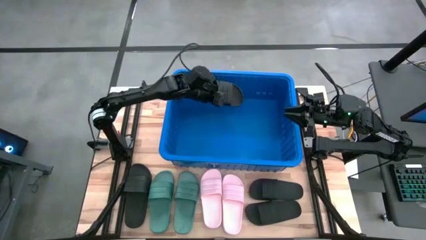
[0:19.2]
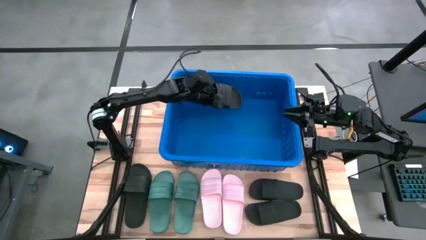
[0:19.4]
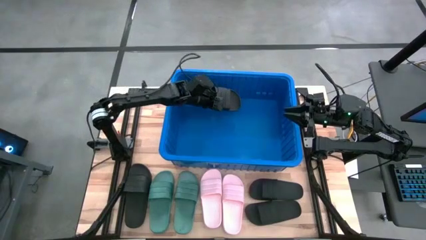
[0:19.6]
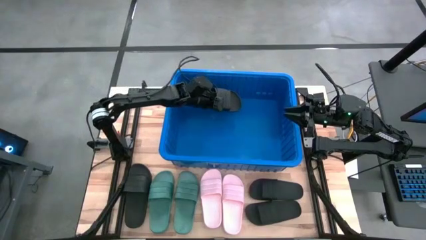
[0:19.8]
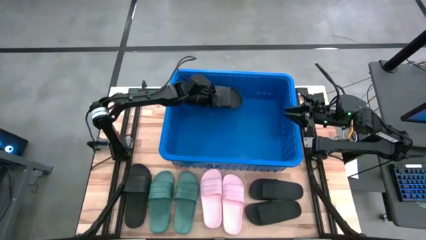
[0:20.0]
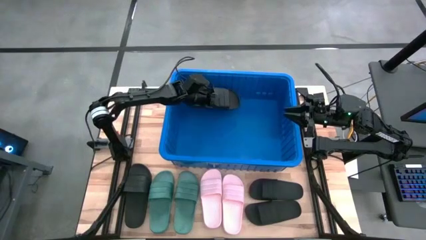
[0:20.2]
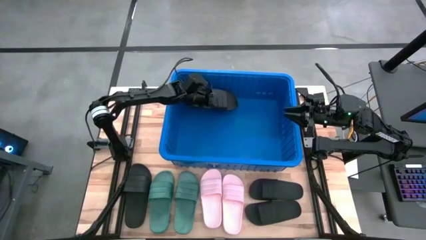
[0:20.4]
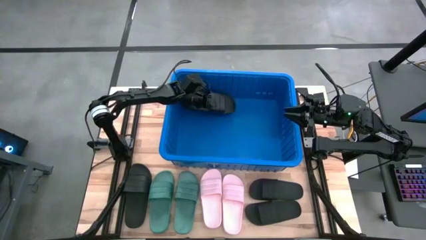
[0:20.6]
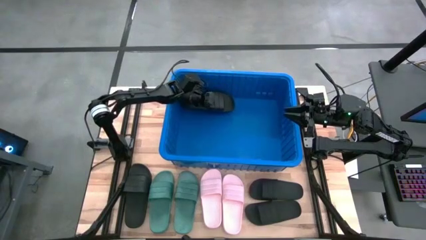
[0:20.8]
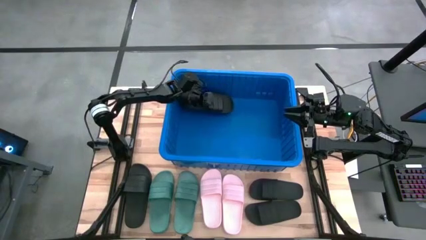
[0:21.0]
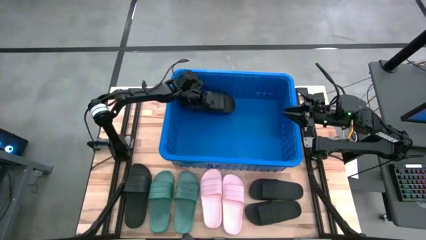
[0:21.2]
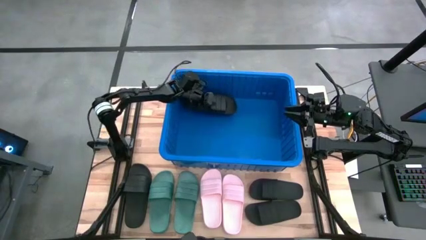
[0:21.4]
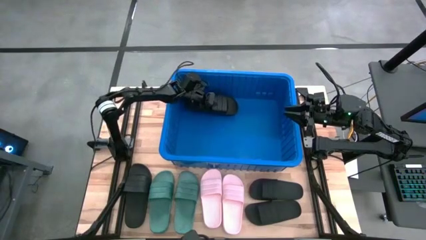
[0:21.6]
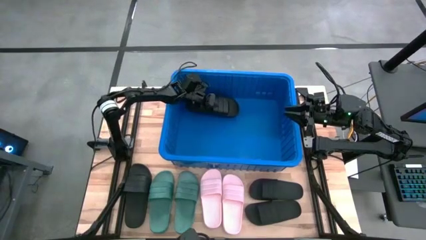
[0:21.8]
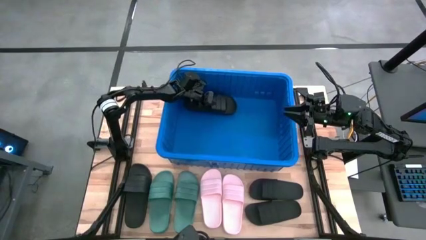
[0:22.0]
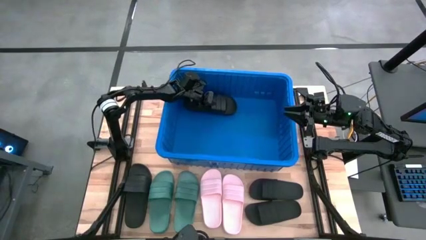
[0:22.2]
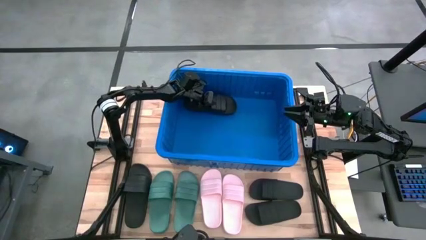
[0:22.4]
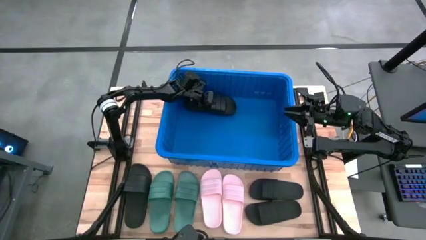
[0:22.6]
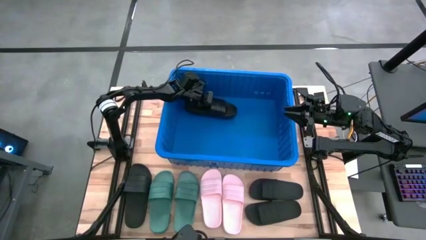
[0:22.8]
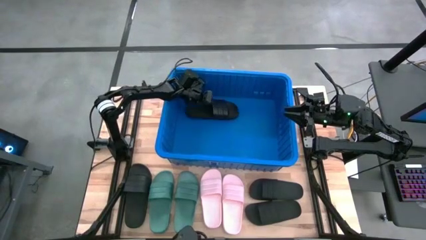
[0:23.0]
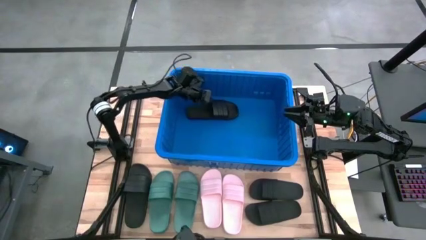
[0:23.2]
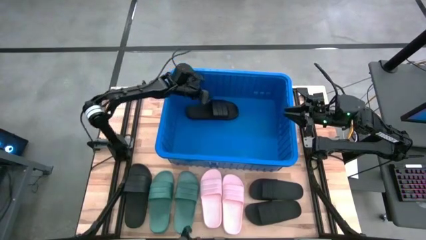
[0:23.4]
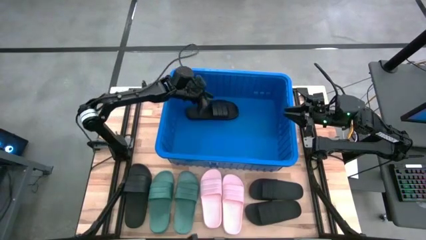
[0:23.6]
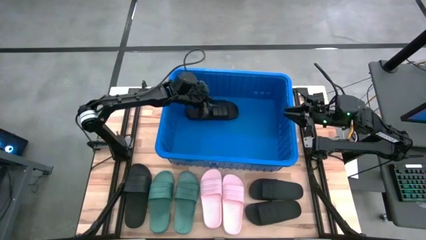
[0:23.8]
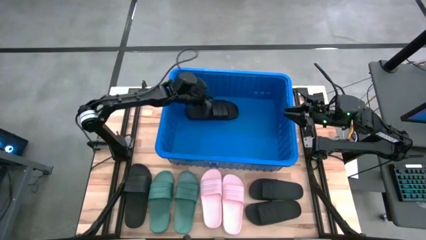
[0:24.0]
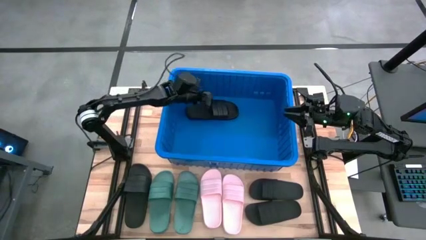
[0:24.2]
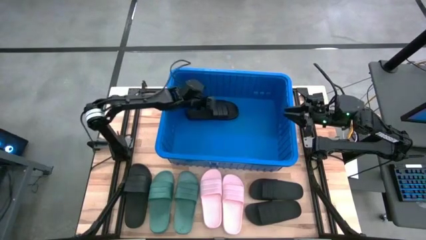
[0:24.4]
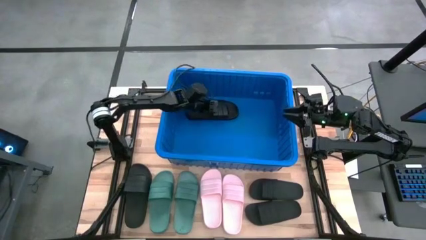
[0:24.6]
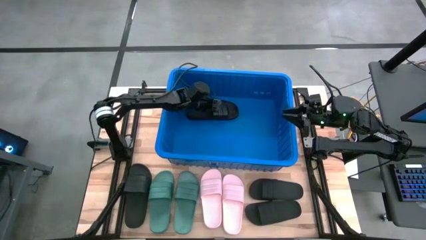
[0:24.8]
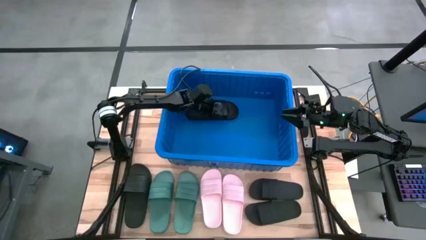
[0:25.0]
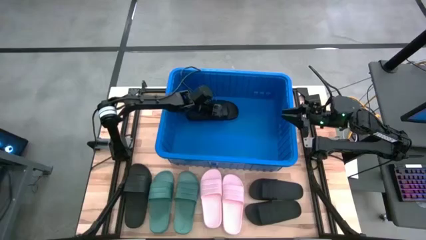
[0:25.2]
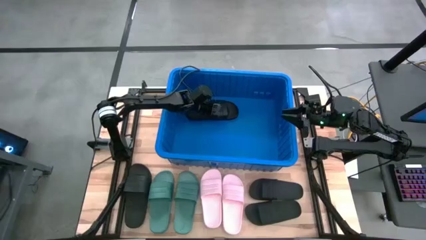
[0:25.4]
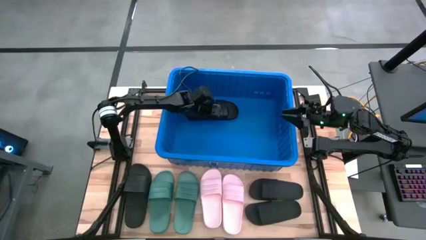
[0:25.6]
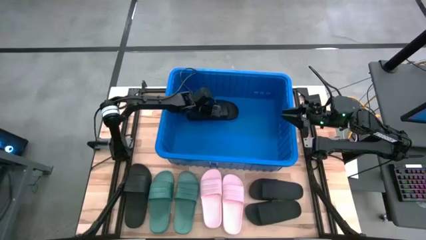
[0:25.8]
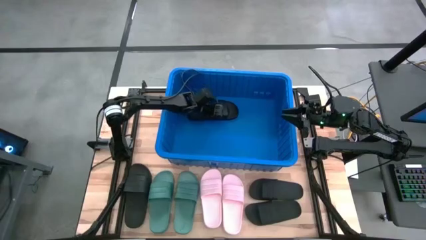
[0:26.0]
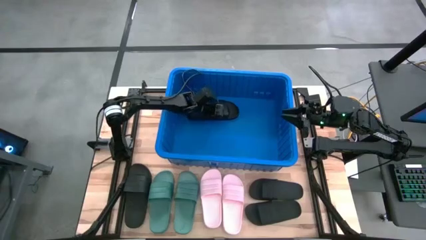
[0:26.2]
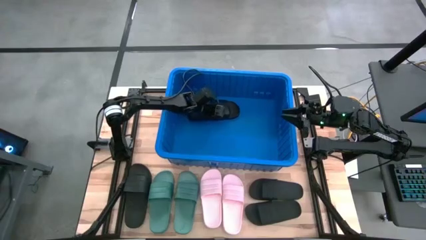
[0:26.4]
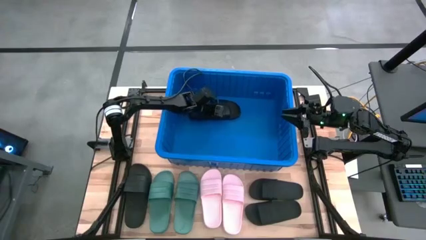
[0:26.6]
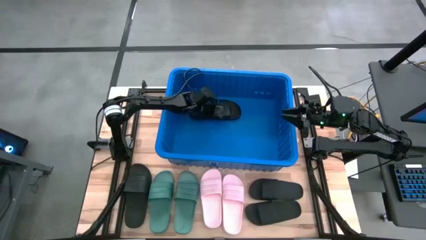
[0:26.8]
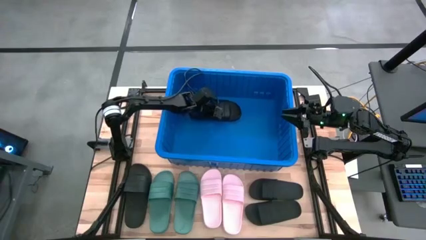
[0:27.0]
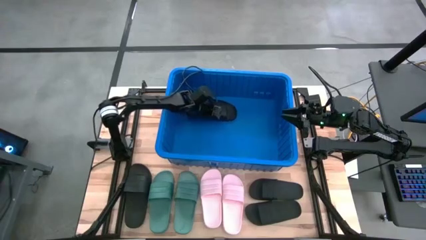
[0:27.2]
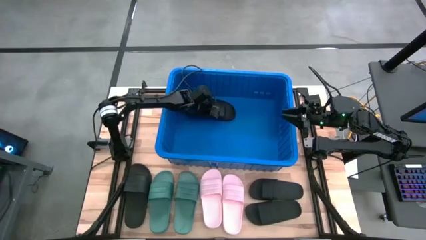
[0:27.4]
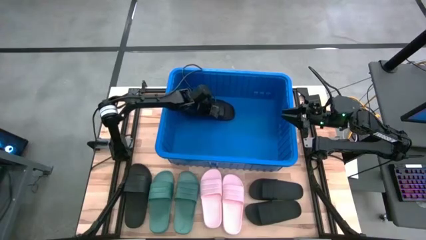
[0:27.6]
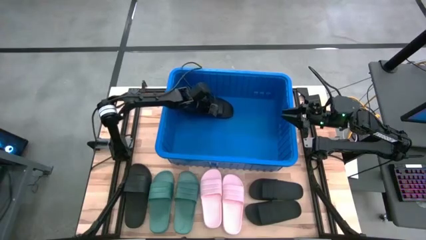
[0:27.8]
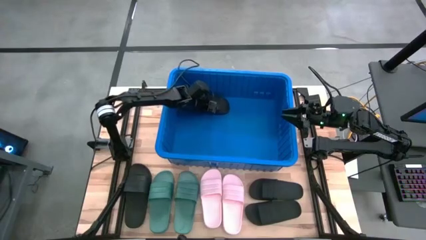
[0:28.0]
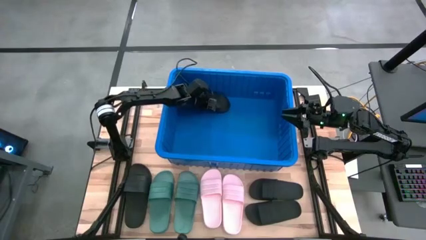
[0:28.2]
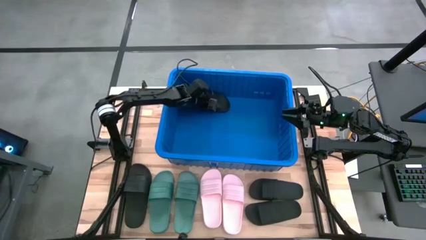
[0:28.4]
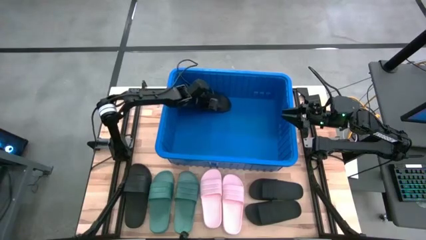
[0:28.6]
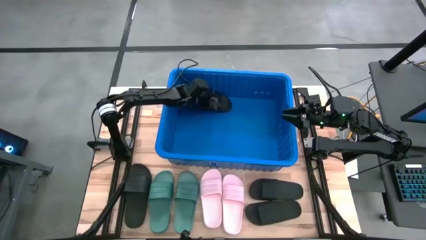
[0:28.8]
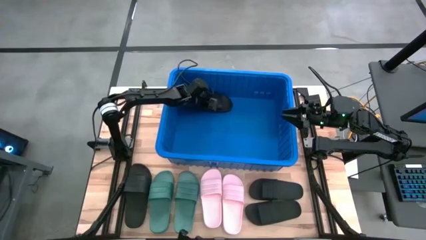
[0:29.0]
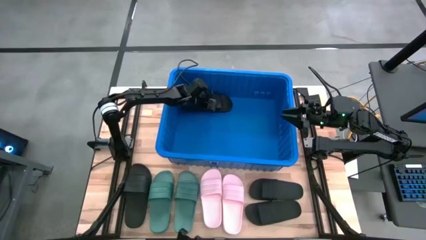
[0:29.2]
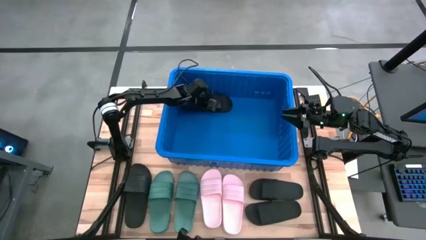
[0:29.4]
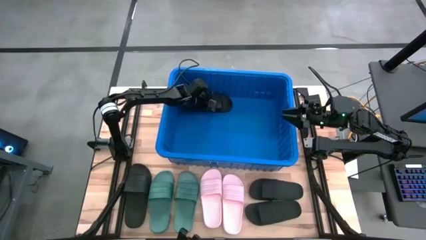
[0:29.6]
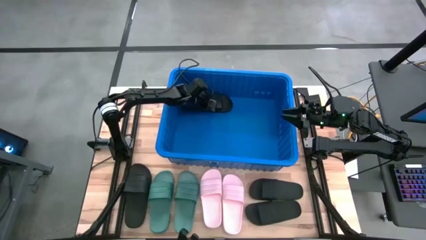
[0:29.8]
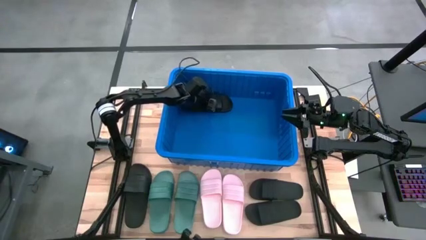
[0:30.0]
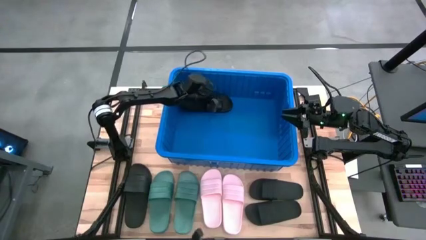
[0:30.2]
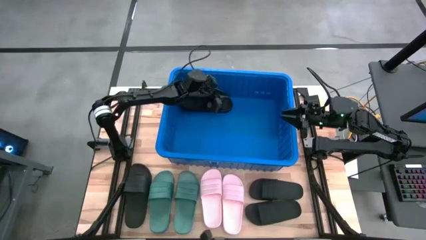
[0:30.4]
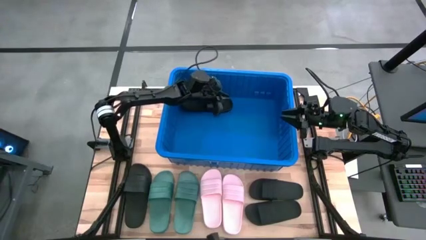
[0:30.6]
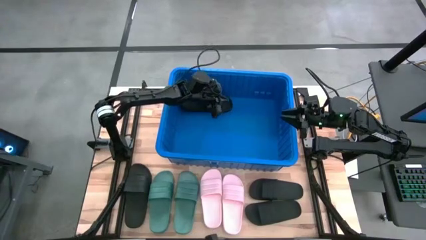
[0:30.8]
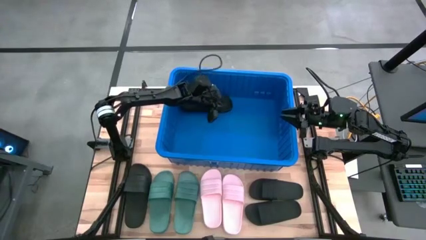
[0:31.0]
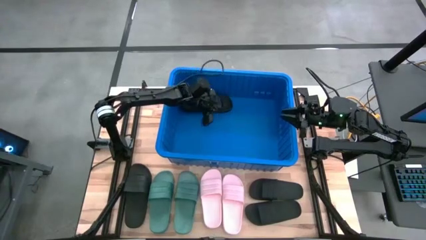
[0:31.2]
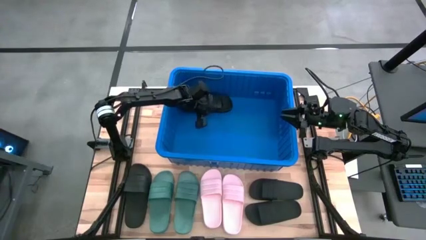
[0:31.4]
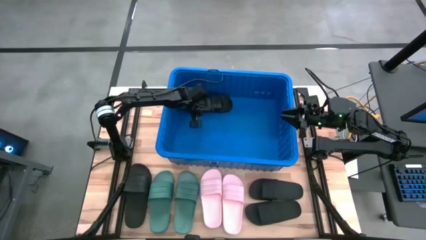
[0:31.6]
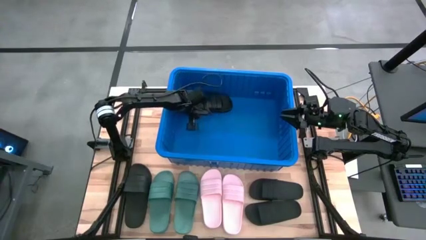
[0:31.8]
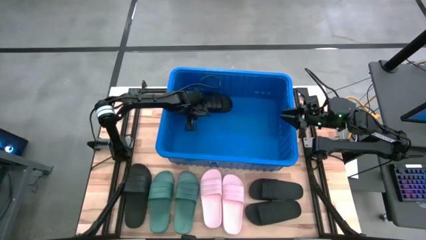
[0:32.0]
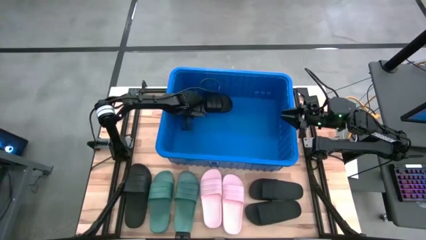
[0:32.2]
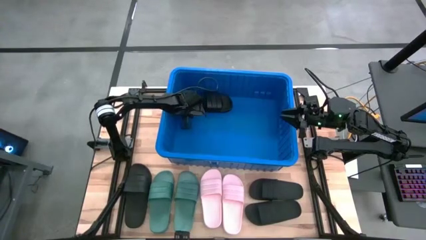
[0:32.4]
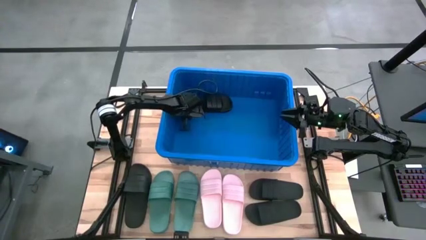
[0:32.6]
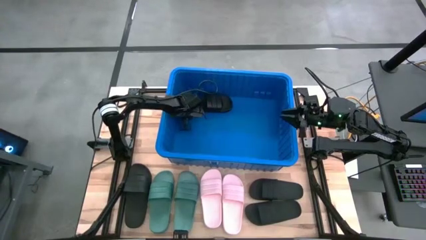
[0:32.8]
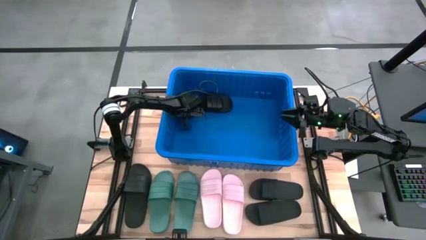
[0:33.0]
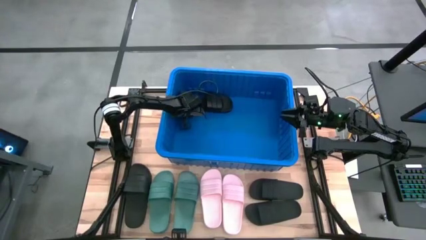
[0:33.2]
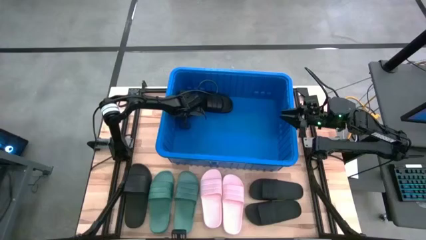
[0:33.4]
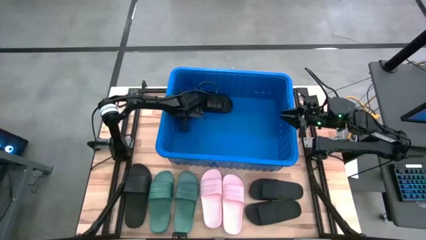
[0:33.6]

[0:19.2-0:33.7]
Task: Pick and place slides into bin
Put the black slipper into the blue bin
